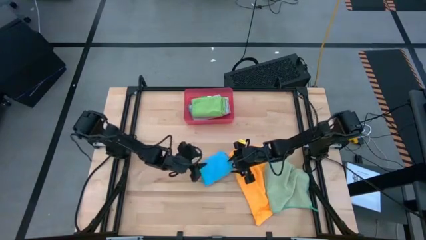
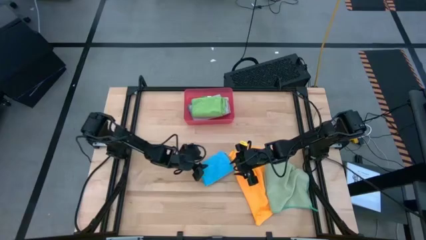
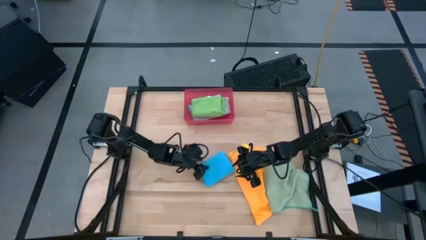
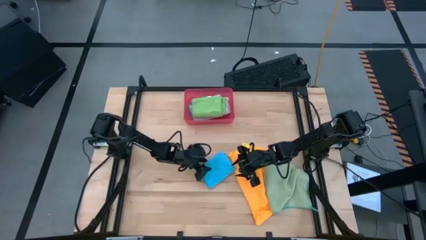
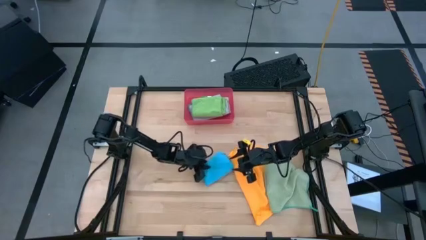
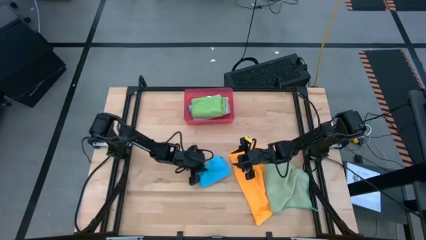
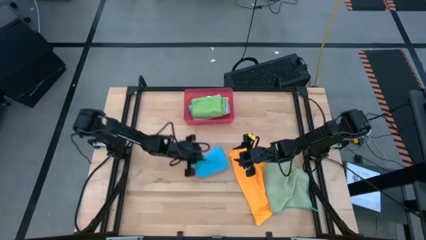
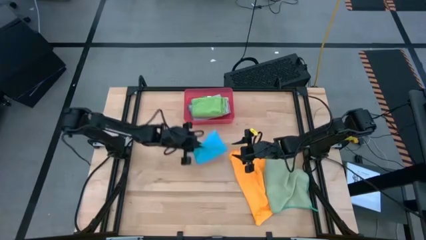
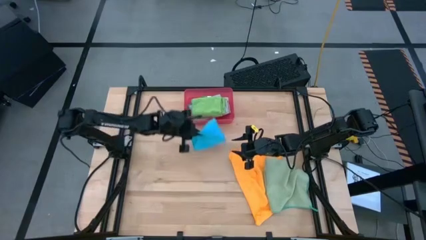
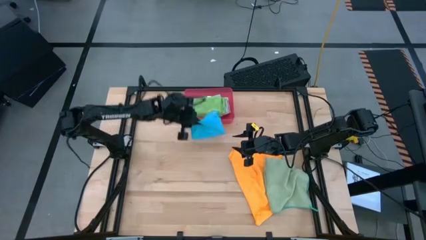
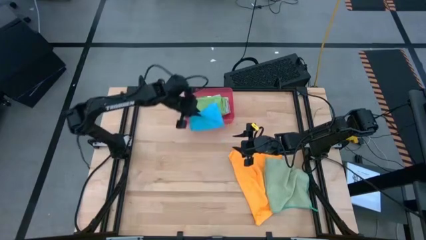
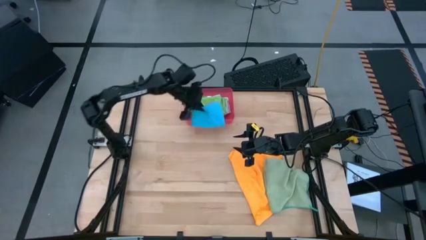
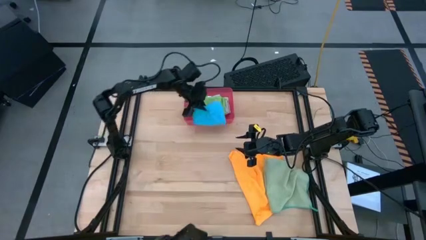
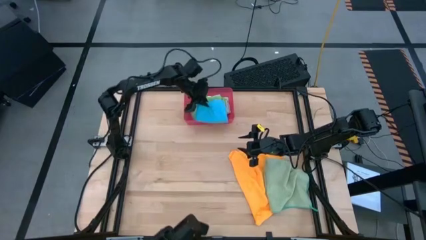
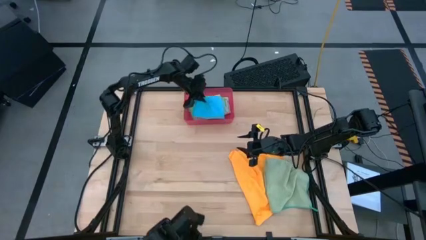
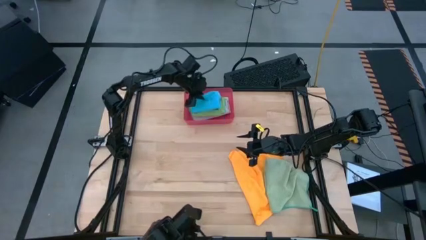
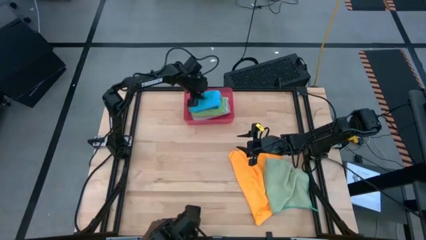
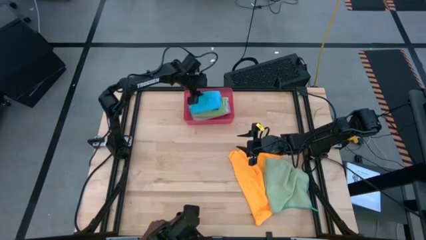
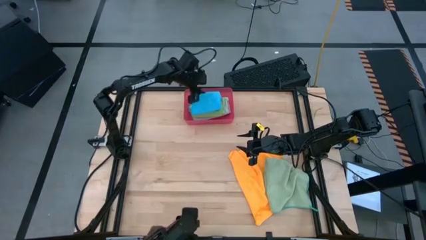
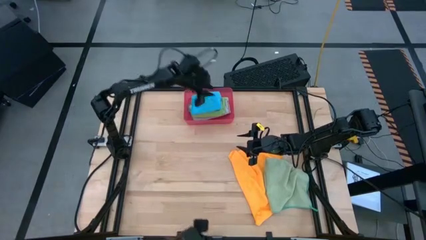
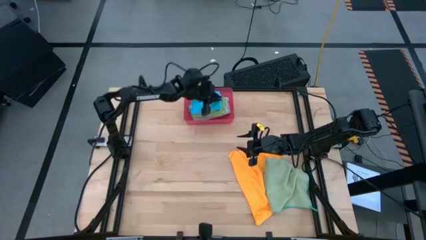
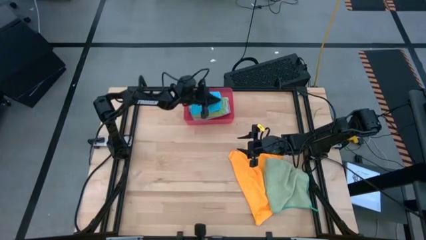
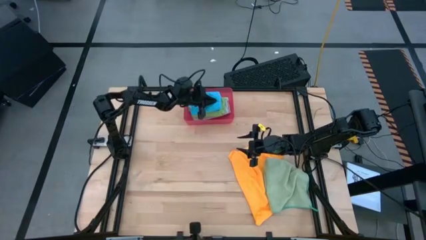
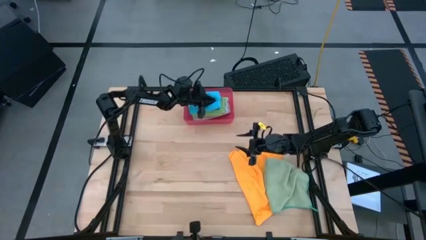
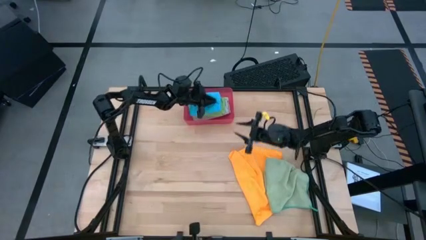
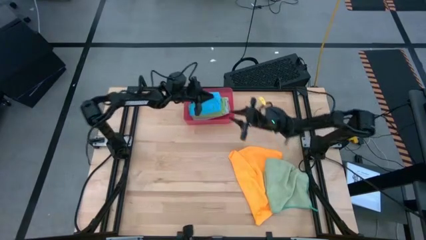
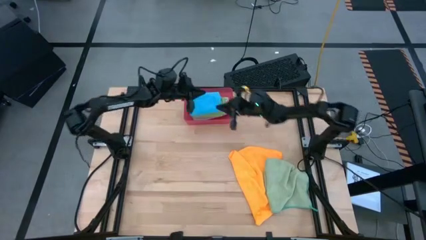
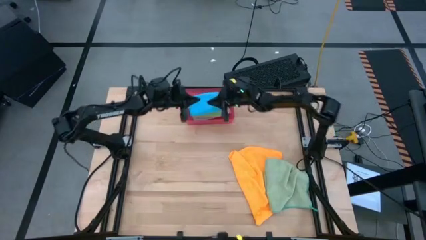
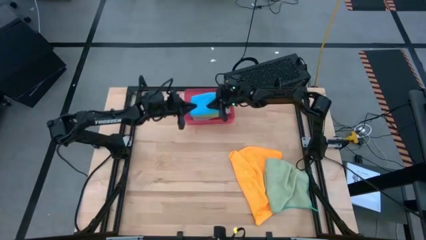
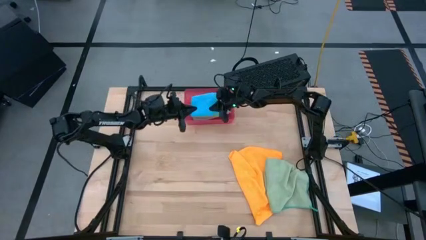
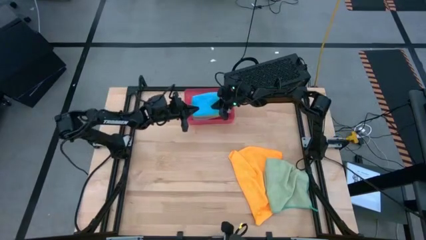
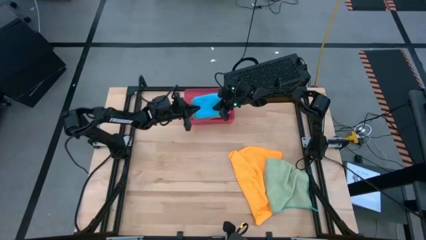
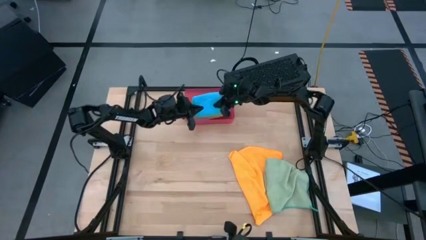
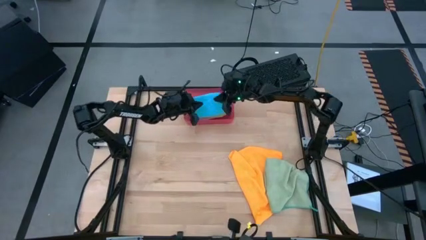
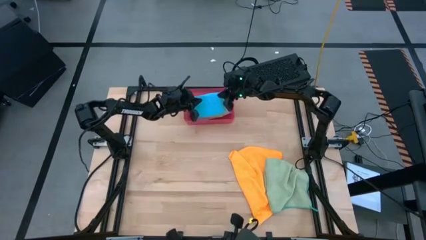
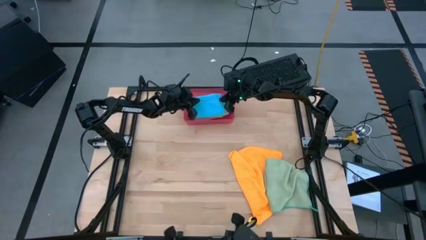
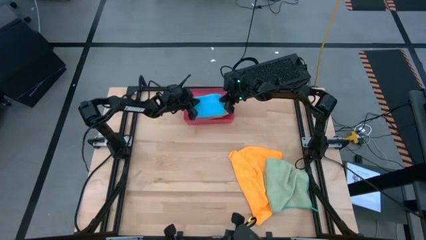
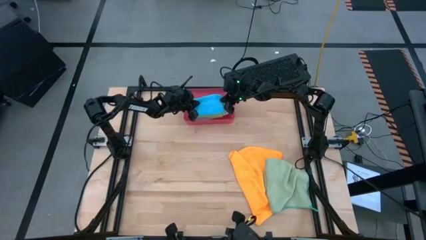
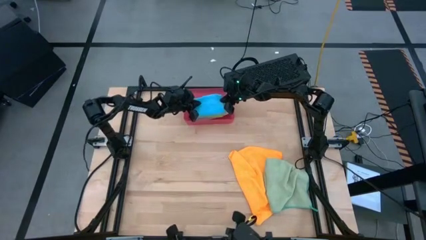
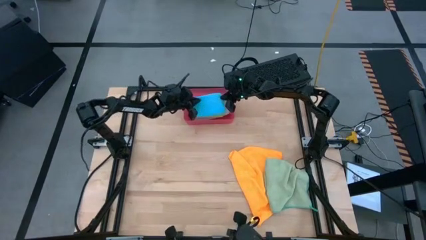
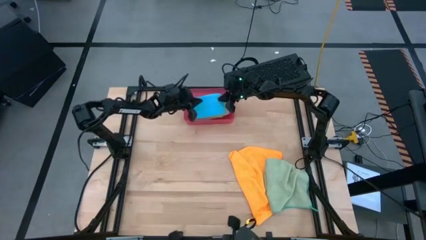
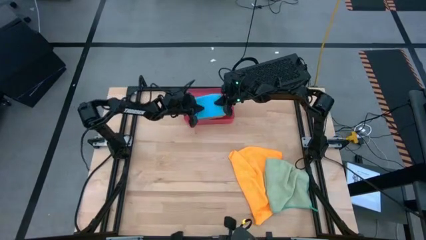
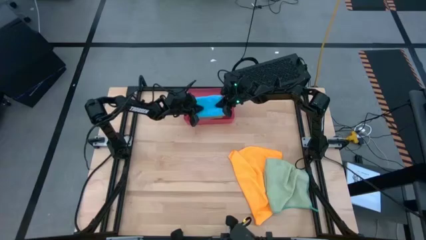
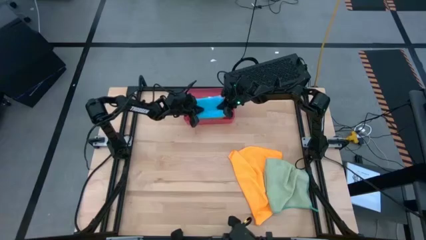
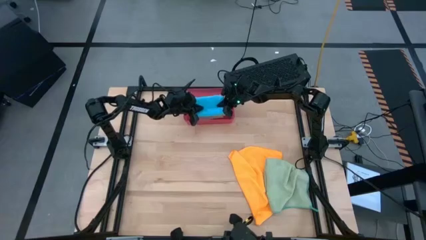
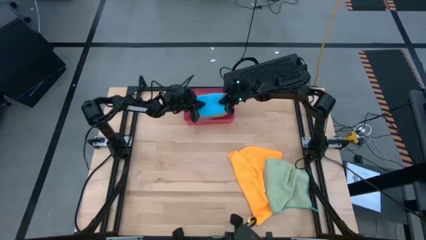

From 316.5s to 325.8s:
Task: Fold microfiber towels
Stack the folded blue towel on top of the folded green towel in the red bin

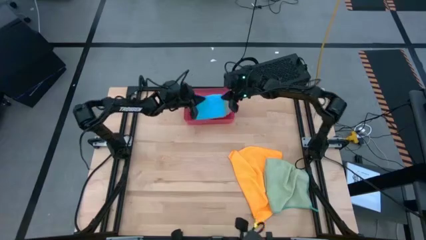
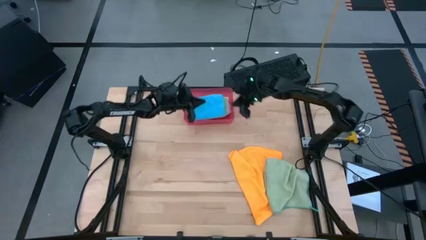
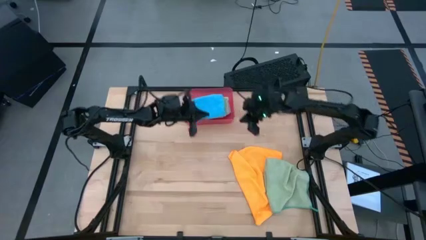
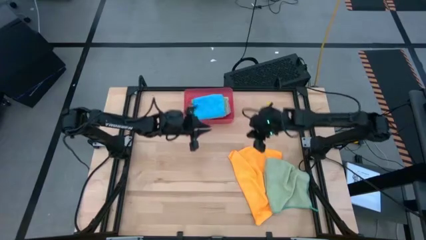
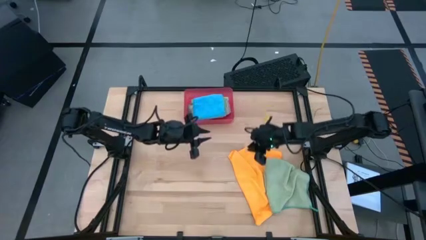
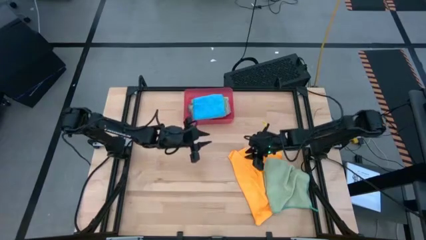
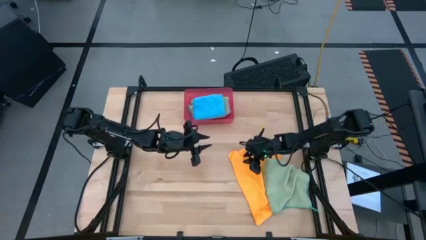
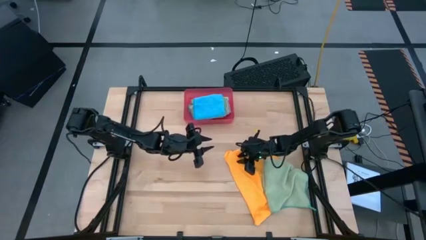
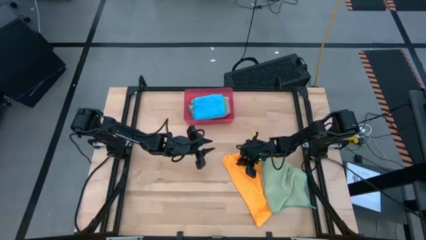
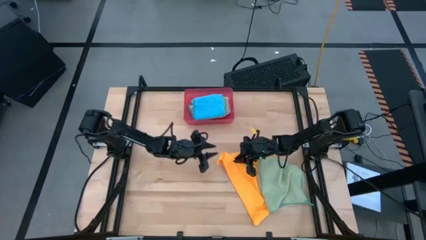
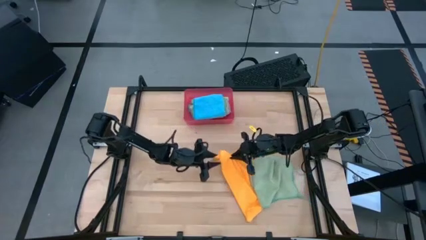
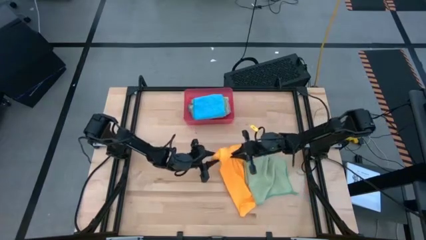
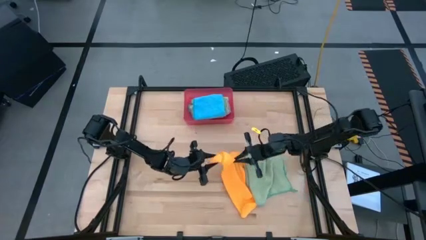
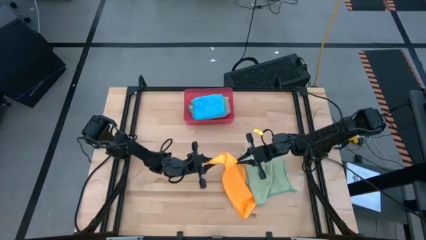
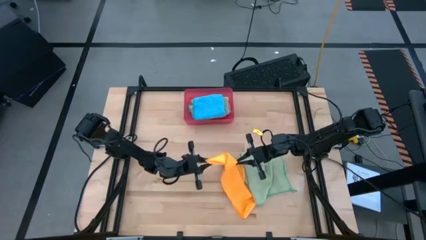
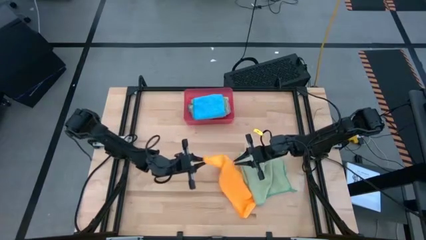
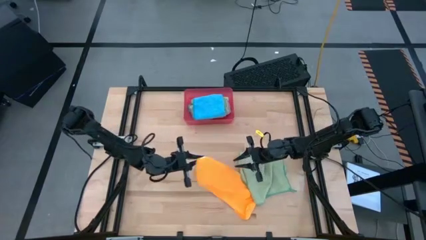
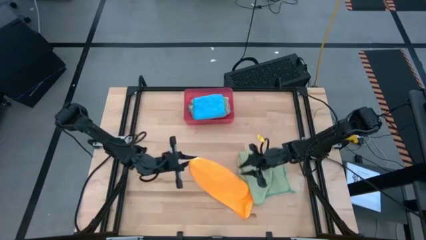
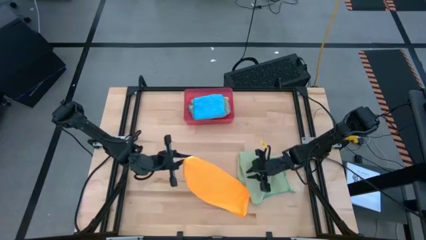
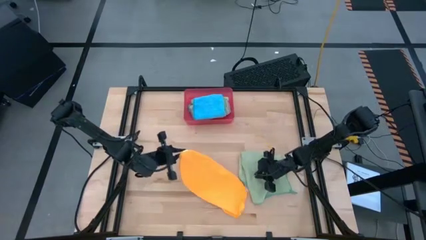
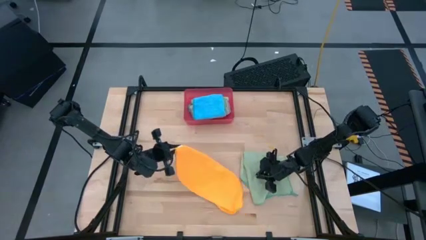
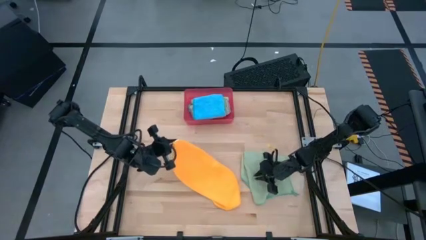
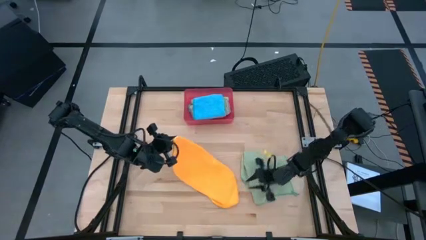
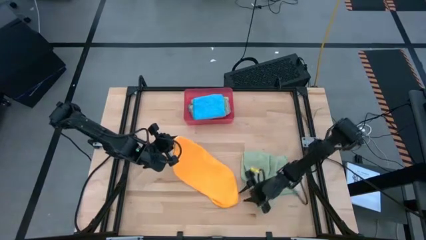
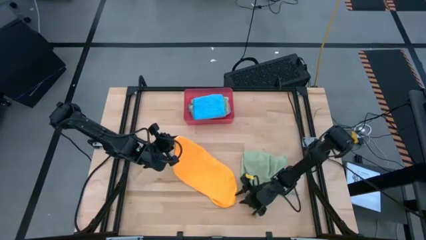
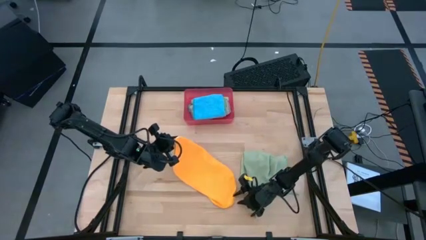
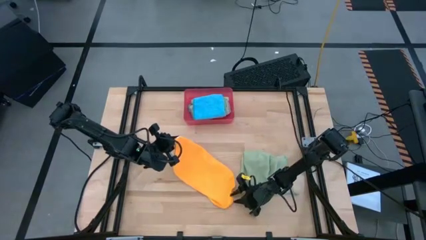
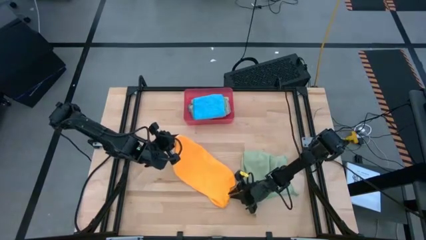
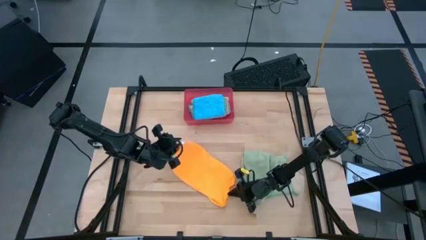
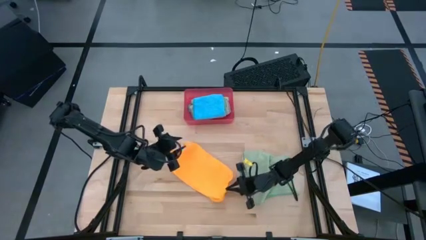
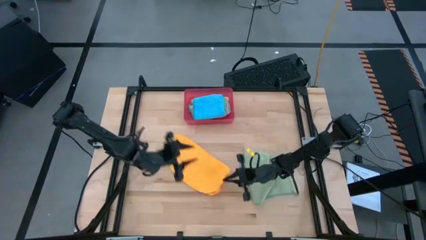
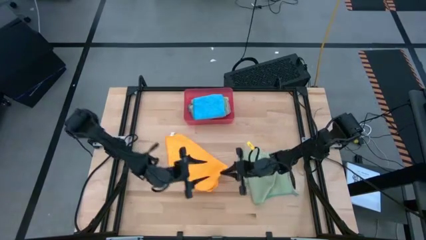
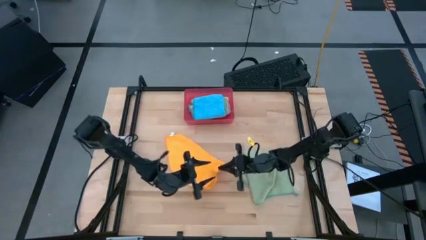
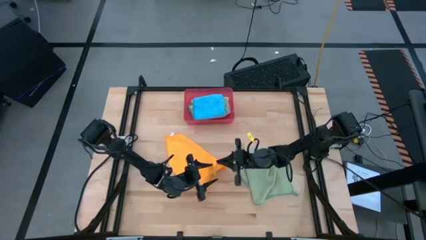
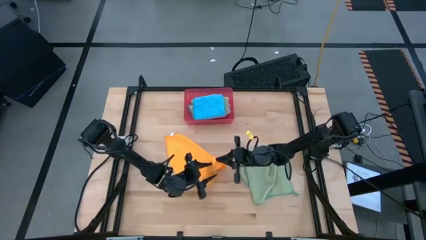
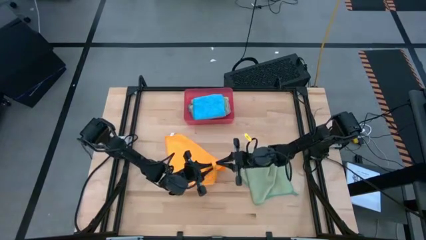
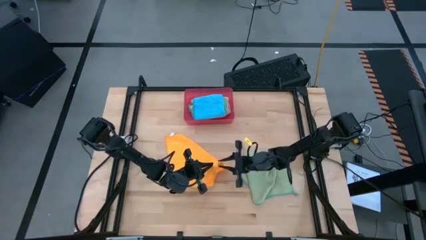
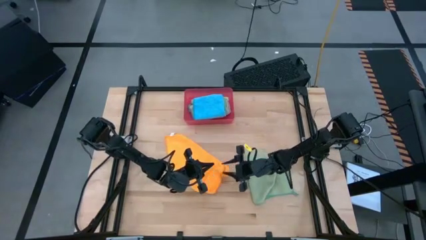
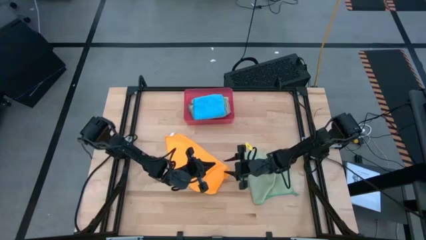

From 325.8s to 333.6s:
Fold the yellow towel
